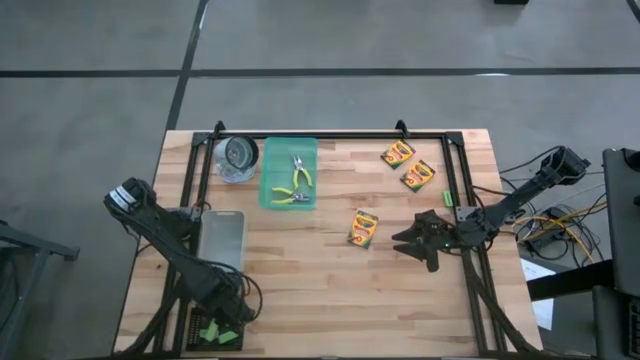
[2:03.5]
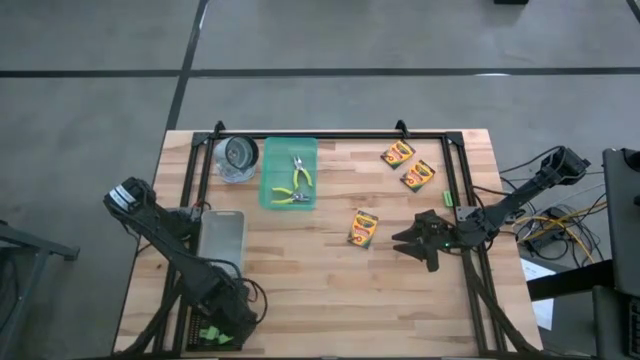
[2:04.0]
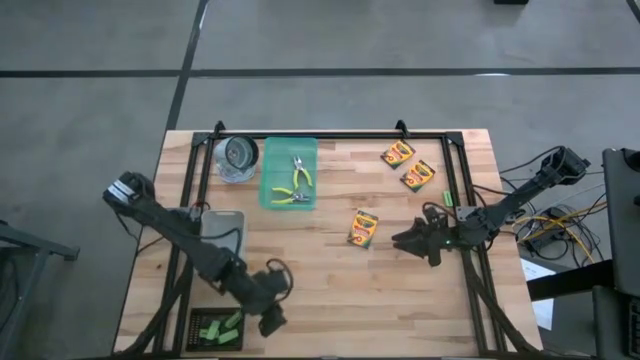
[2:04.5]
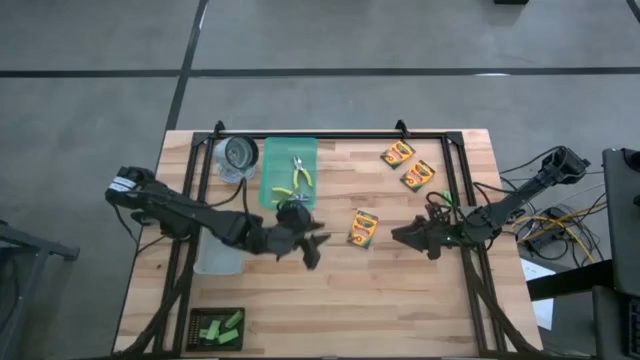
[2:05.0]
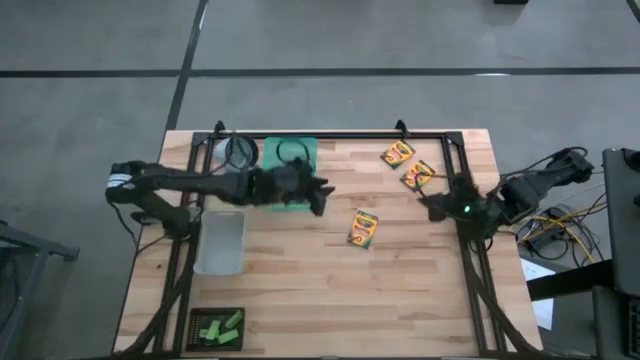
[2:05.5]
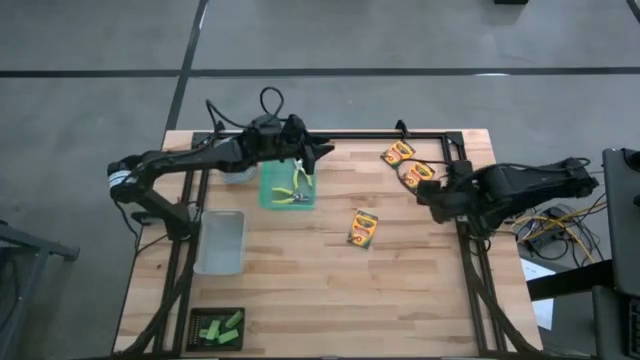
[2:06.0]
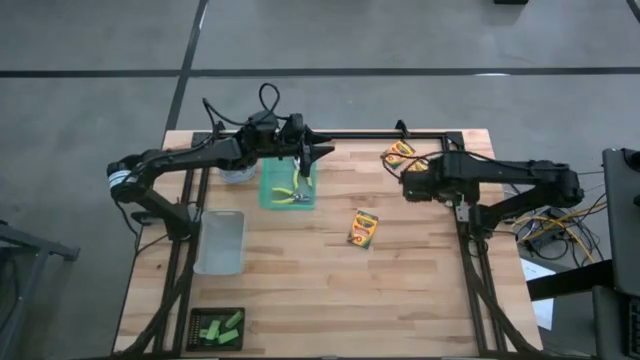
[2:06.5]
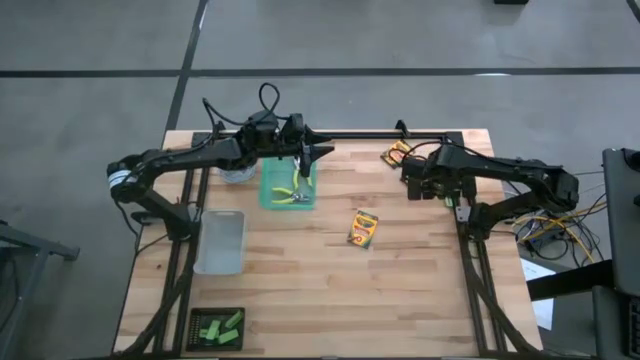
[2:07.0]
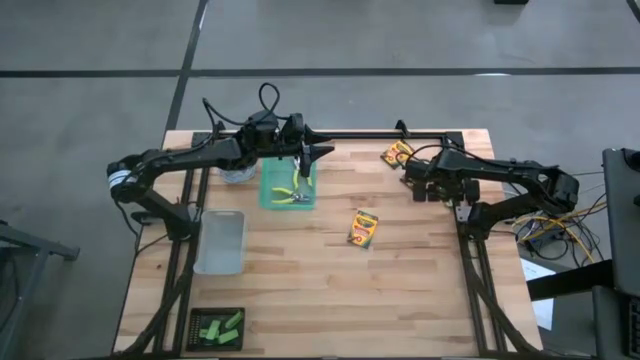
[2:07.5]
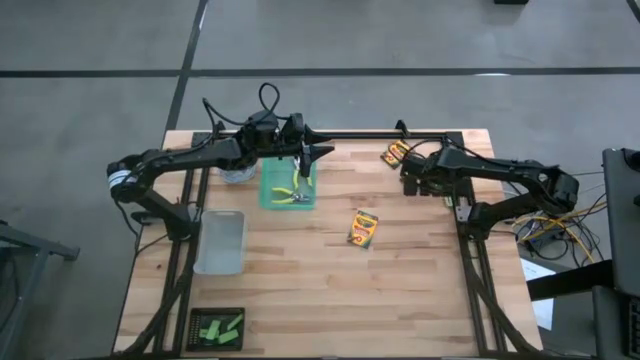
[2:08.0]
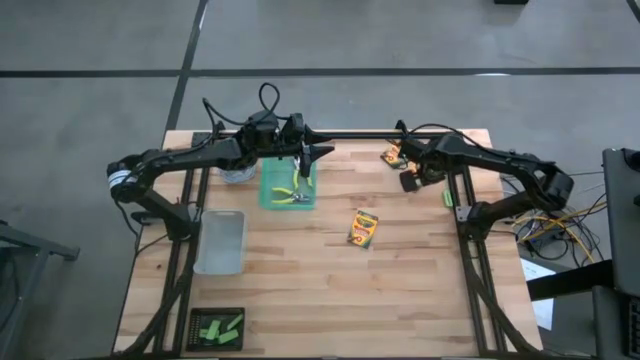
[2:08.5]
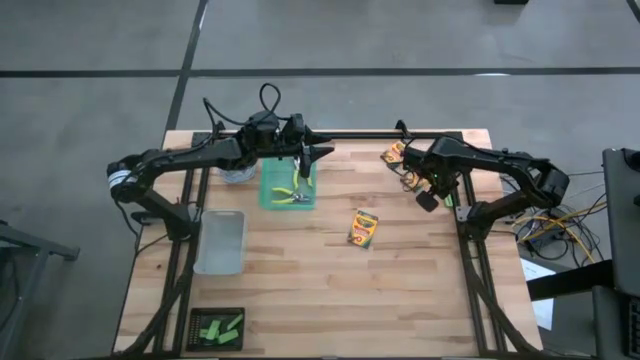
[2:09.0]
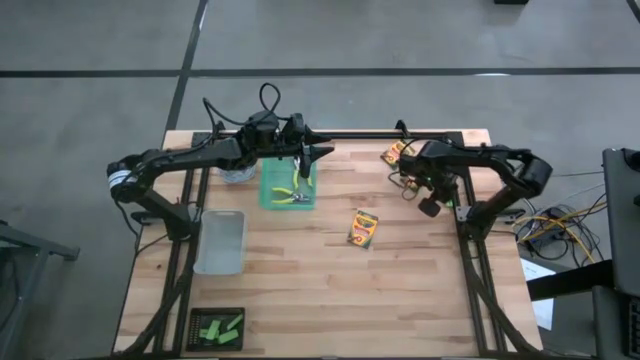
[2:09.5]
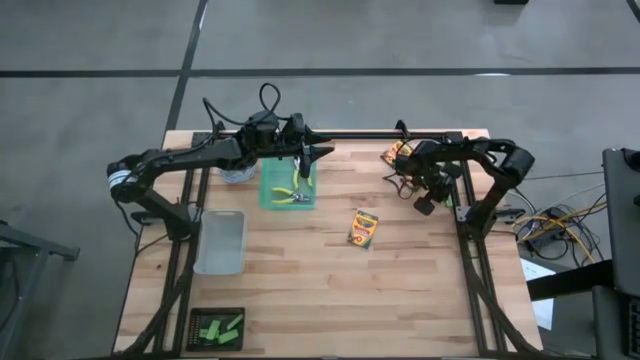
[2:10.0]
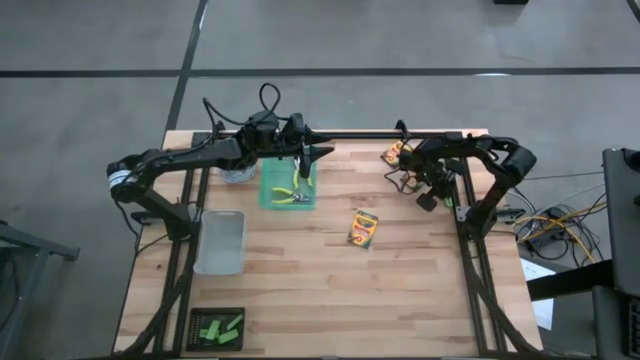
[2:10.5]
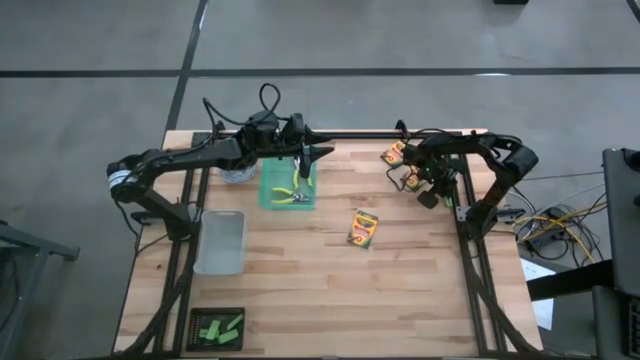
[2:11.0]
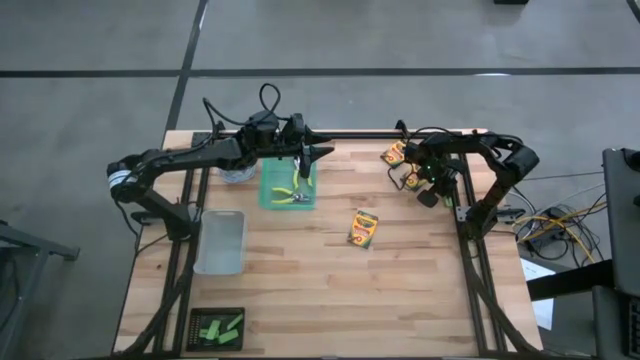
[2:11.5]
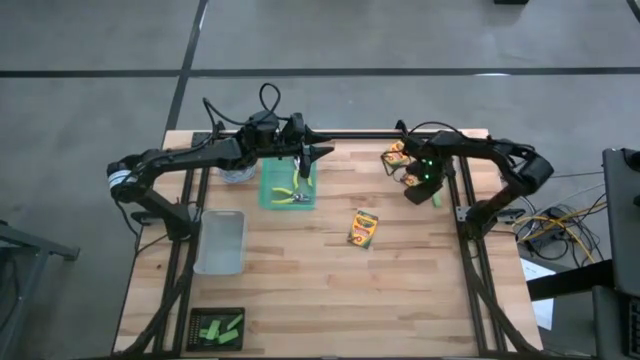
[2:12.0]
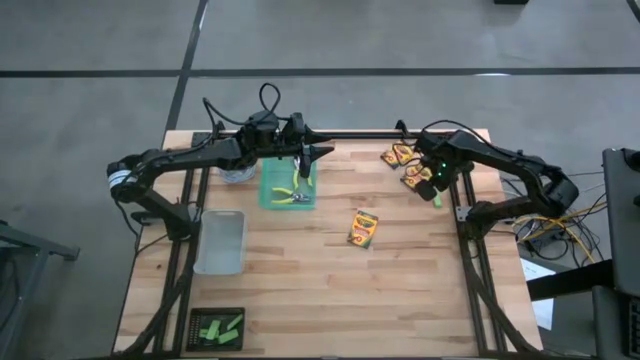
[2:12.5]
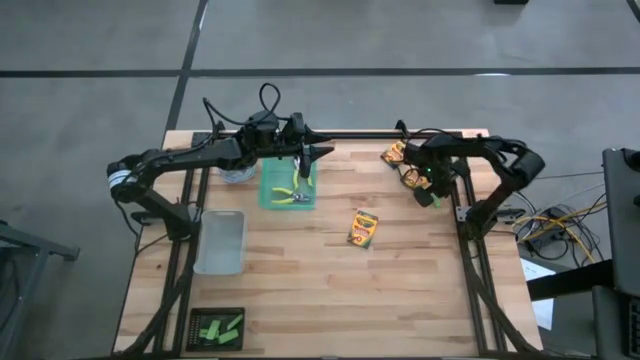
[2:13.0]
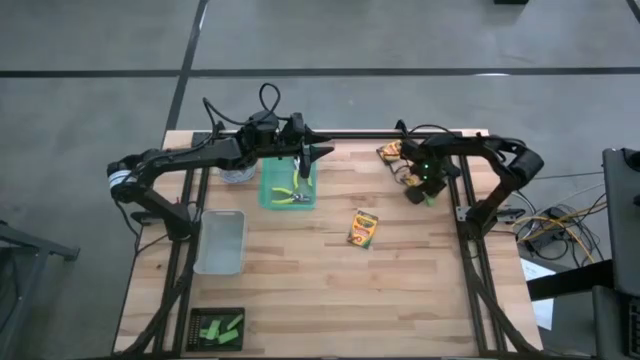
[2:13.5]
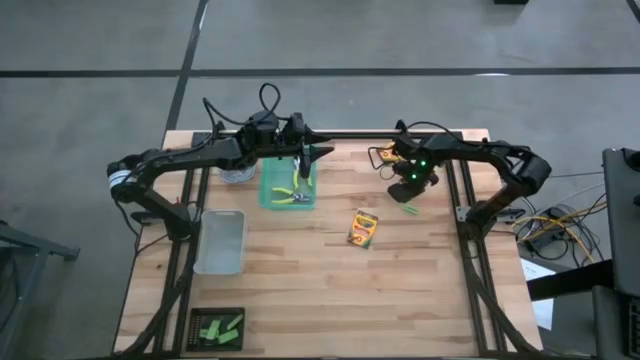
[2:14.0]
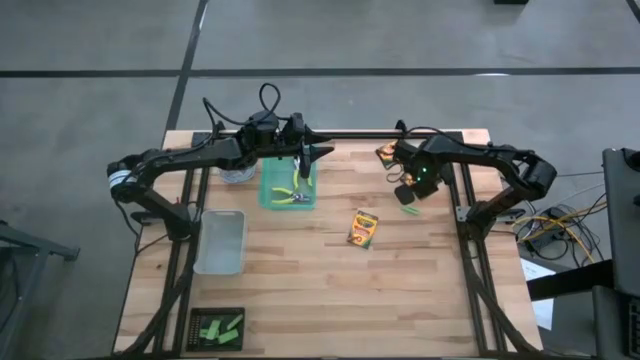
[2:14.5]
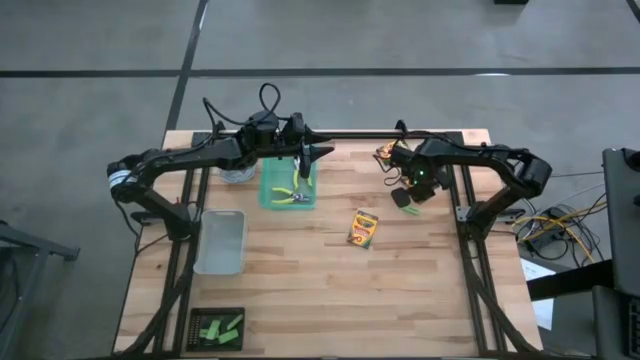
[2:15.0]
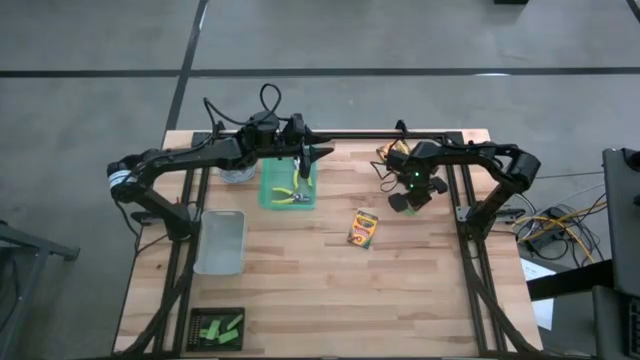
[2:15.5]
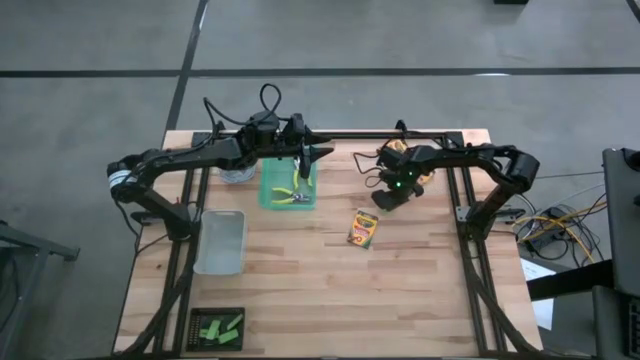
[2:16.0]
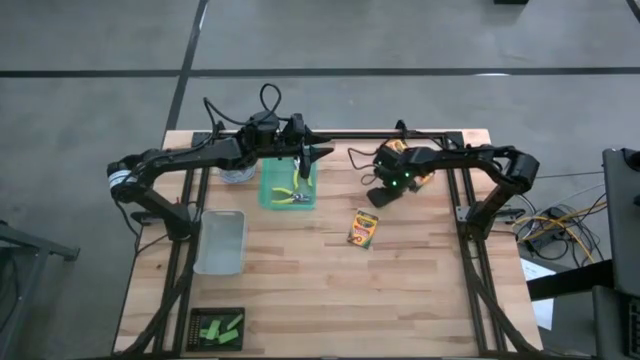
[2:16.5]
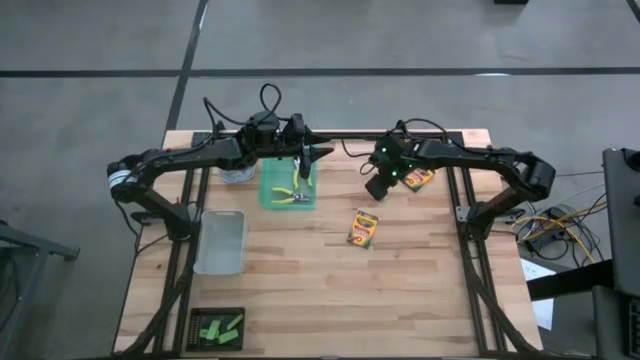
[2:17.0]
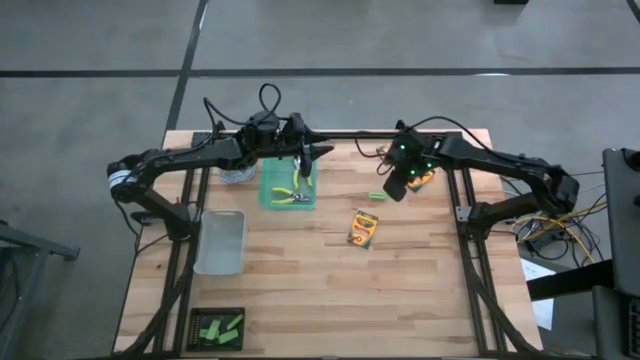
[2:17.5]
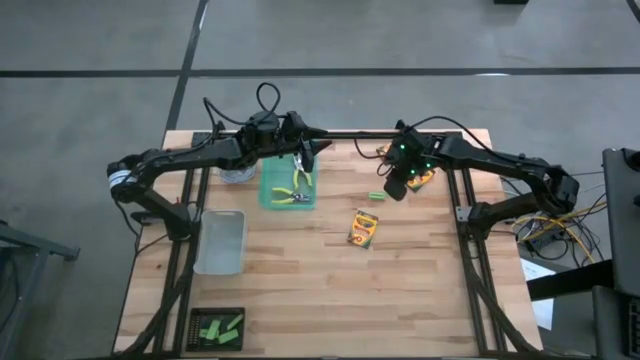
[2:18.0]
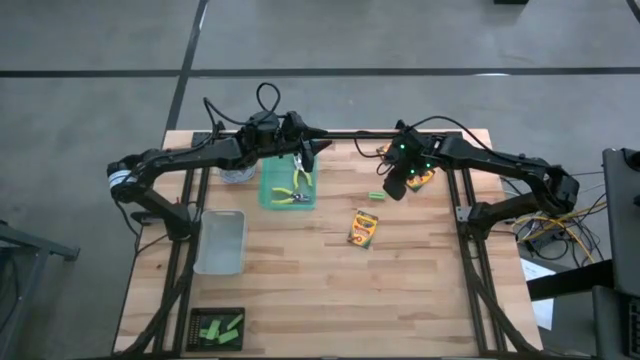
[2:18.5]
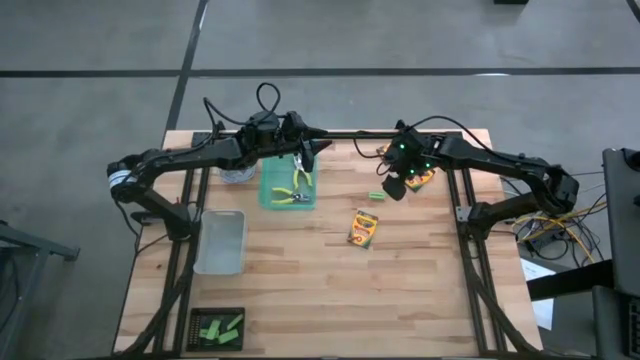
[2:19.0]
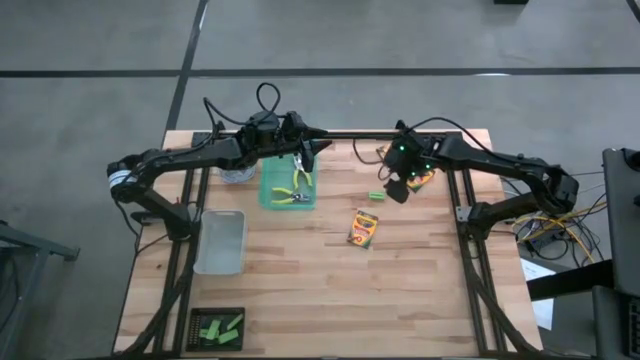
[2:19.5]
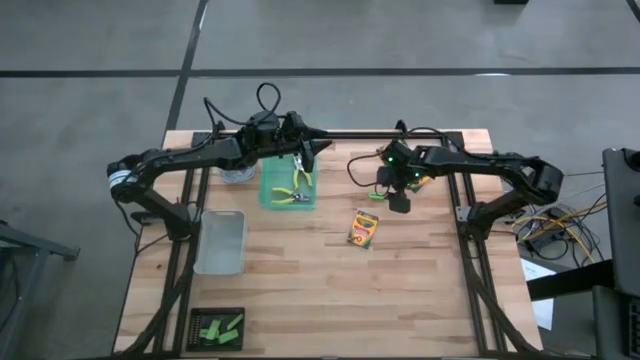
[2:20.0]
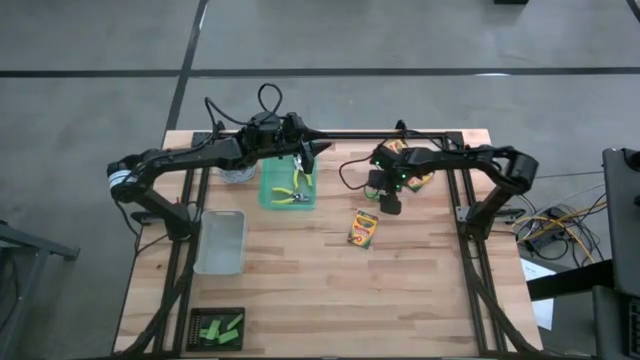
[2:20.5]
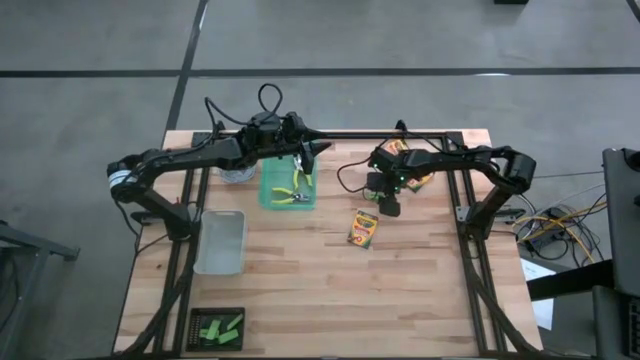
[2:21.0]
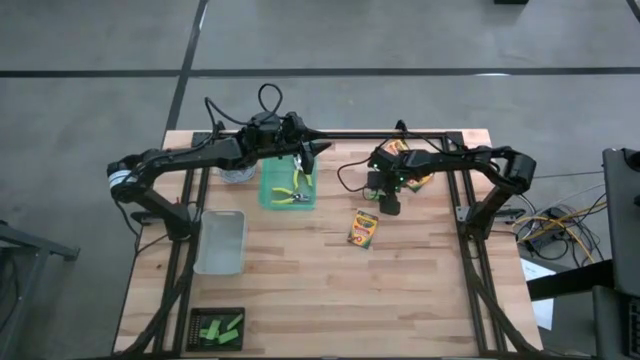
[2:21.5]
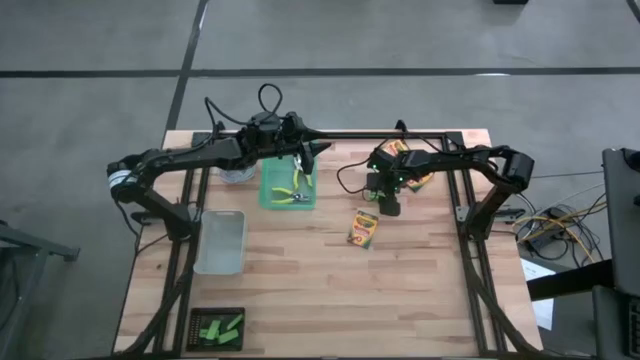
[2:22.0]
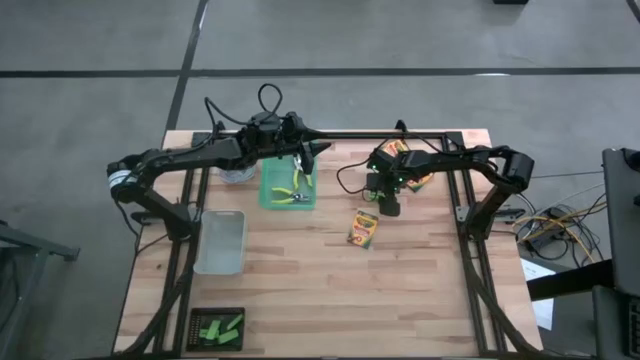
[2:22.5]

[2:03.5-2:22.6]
Task: Pick & Place School Supplies
Put the green eraser into the black bin

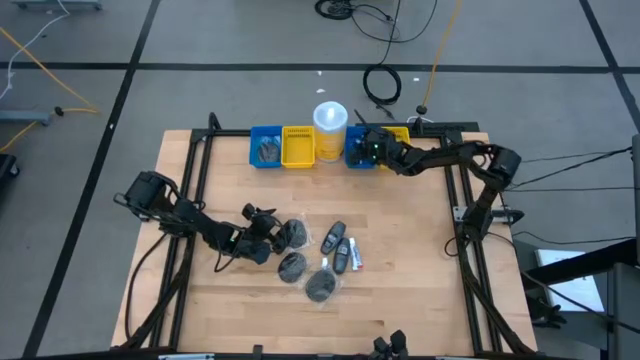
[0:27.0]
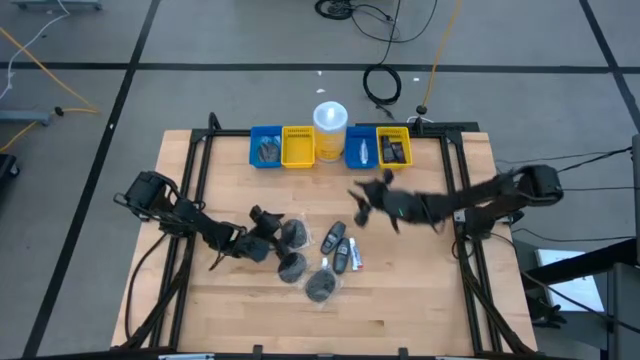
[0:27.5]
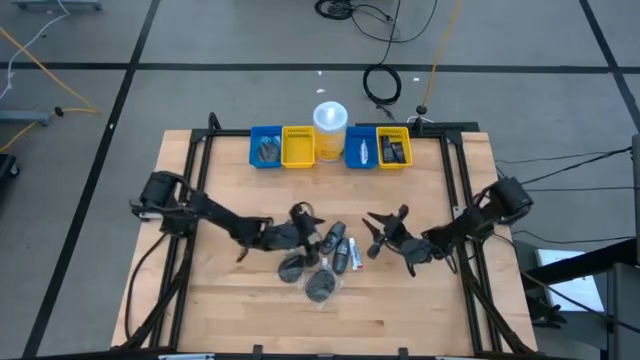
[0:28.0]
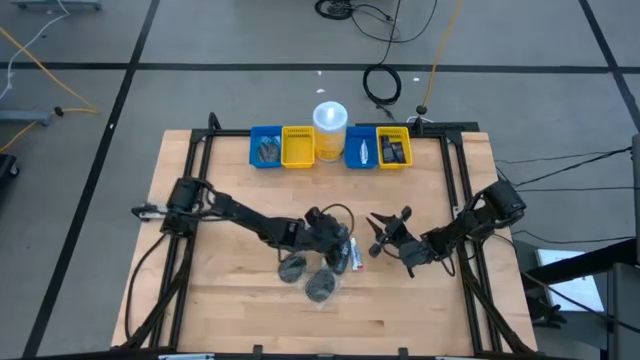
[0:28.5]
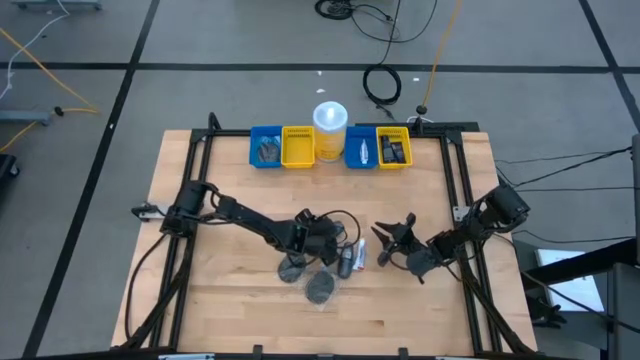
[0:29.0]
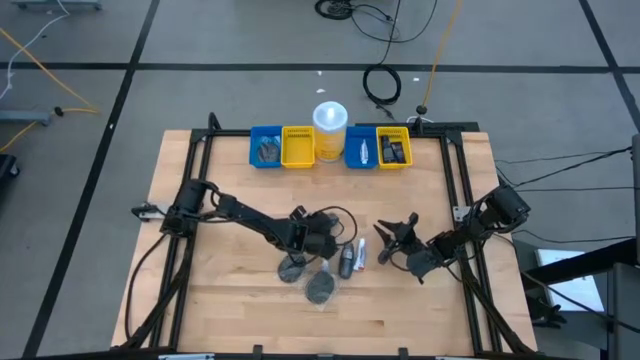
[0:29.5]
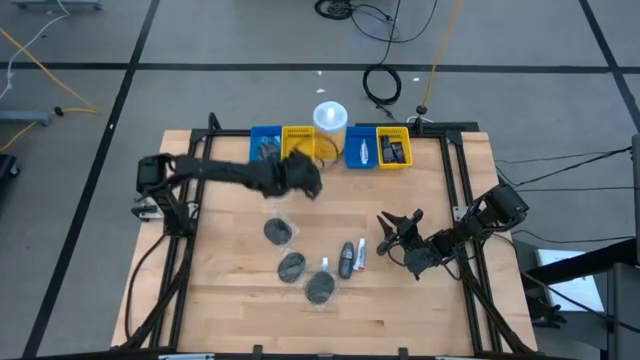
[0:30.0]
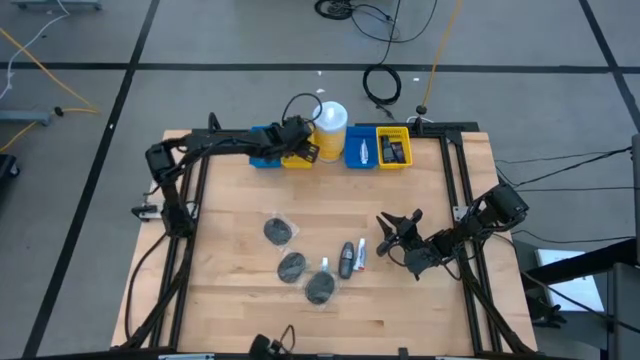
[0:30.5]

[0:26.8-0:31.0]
Task: Pick & Place Travel size toiletries
Put the gray deodorant into the left yellow bin
